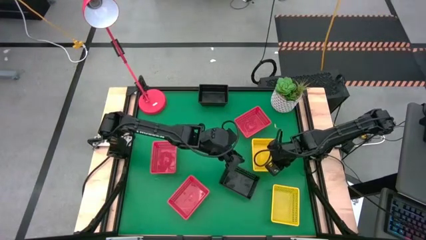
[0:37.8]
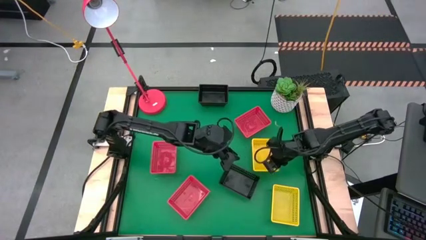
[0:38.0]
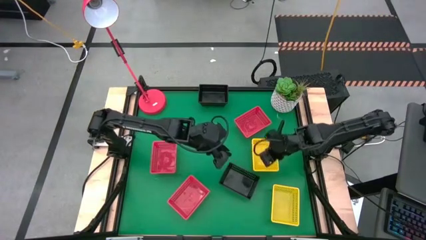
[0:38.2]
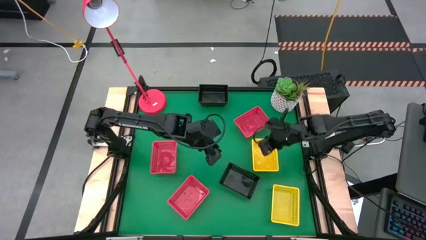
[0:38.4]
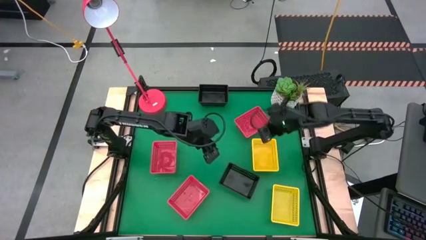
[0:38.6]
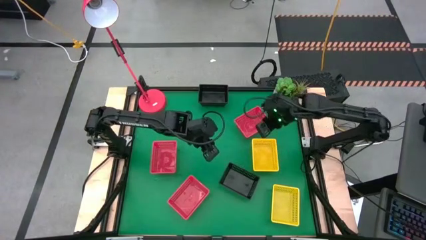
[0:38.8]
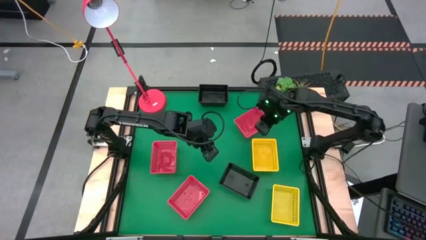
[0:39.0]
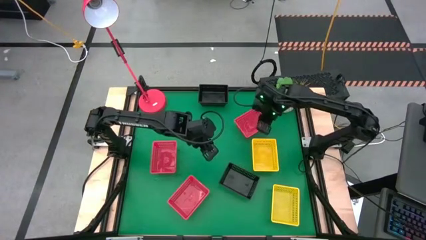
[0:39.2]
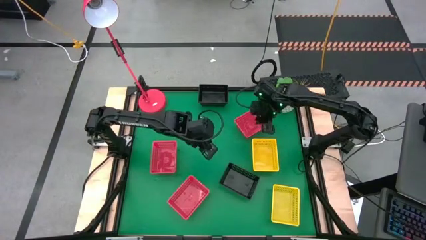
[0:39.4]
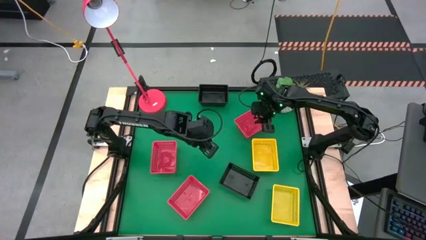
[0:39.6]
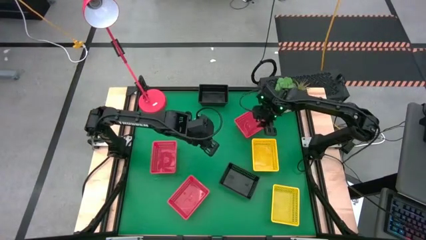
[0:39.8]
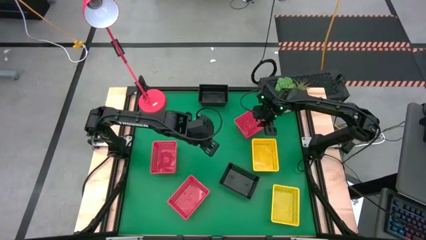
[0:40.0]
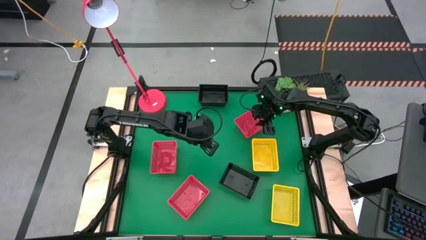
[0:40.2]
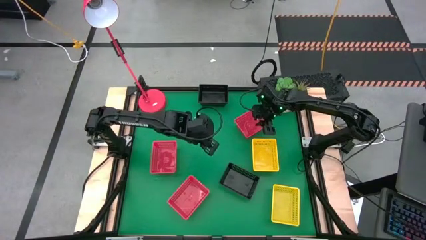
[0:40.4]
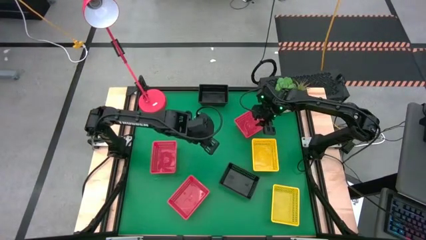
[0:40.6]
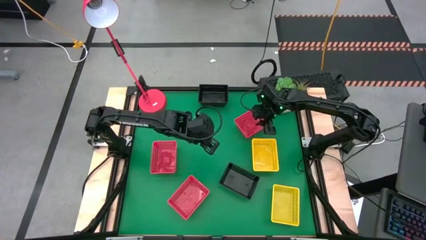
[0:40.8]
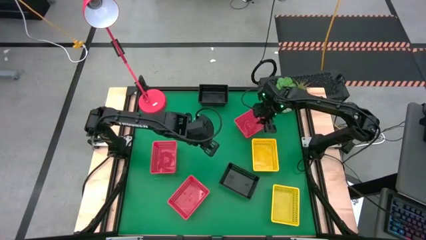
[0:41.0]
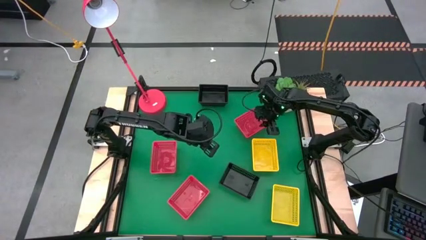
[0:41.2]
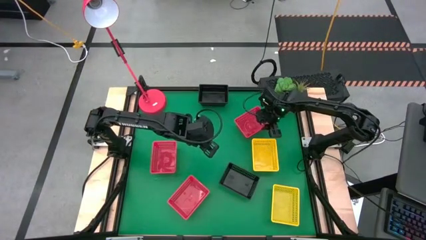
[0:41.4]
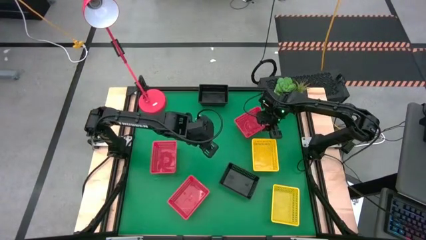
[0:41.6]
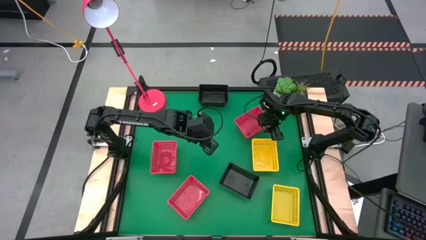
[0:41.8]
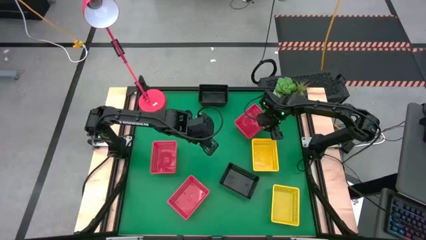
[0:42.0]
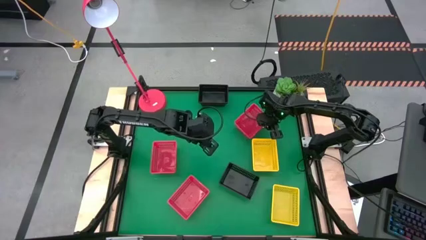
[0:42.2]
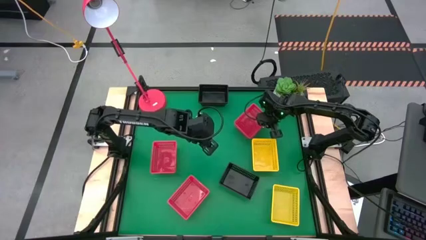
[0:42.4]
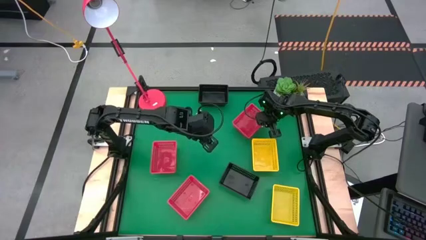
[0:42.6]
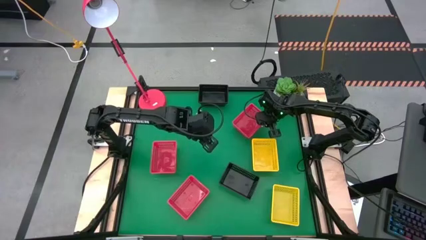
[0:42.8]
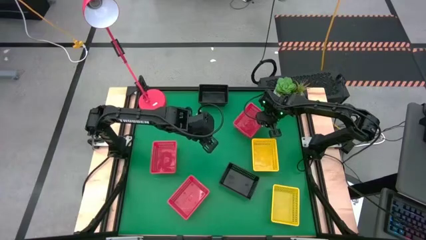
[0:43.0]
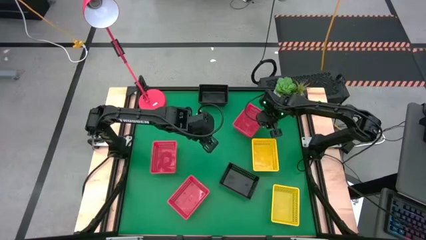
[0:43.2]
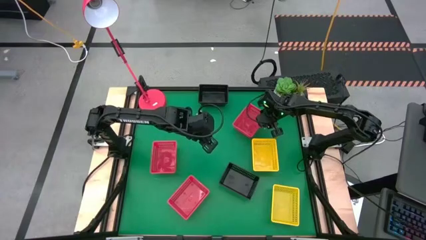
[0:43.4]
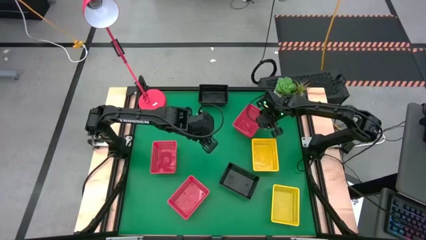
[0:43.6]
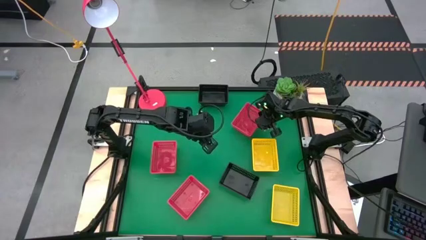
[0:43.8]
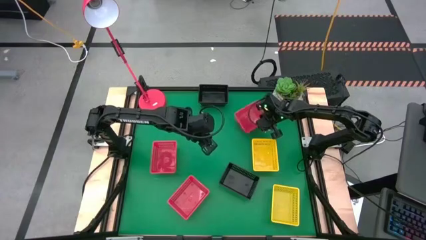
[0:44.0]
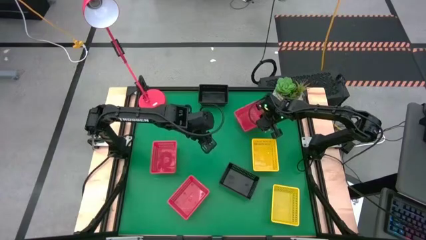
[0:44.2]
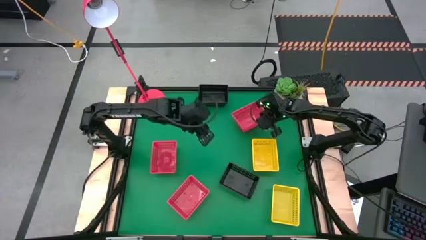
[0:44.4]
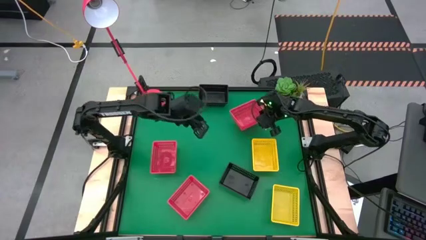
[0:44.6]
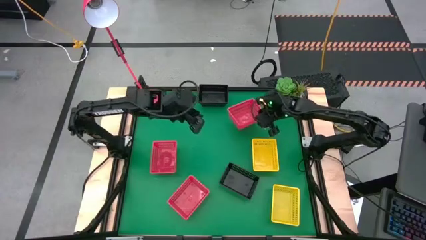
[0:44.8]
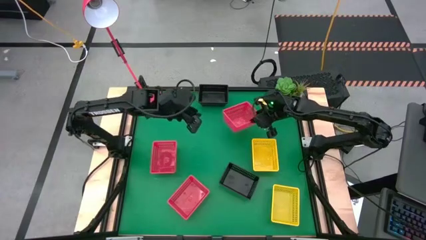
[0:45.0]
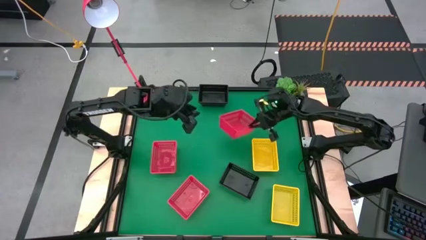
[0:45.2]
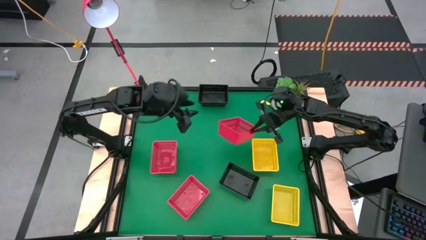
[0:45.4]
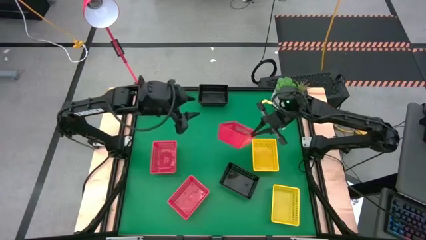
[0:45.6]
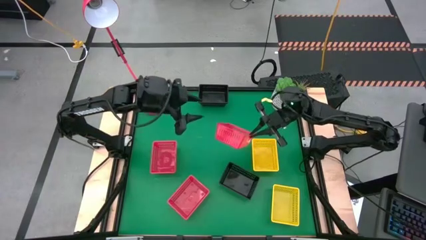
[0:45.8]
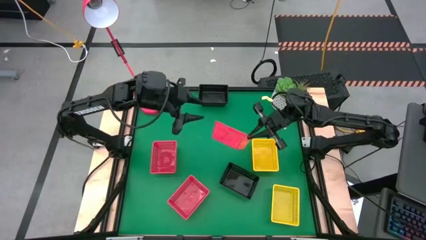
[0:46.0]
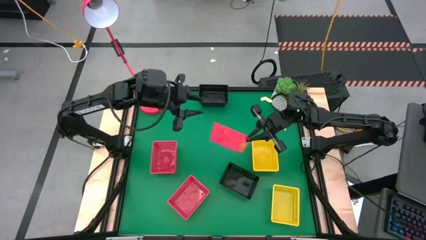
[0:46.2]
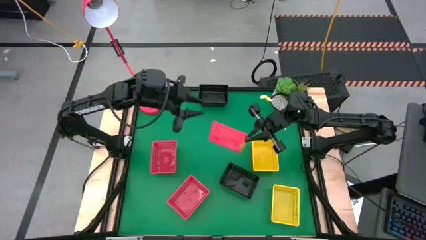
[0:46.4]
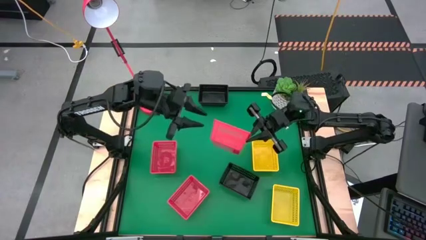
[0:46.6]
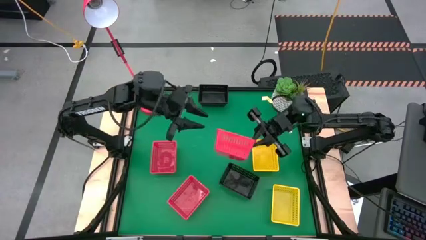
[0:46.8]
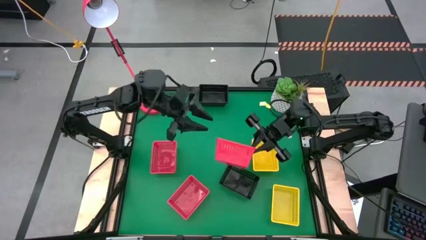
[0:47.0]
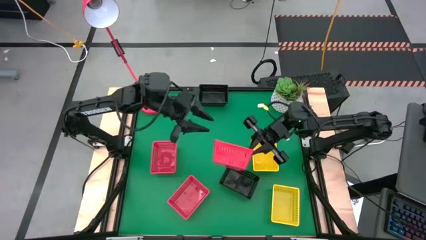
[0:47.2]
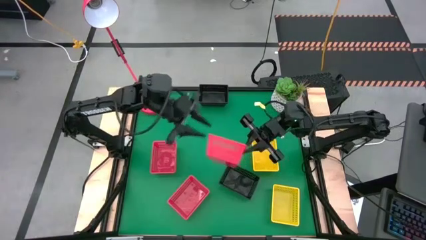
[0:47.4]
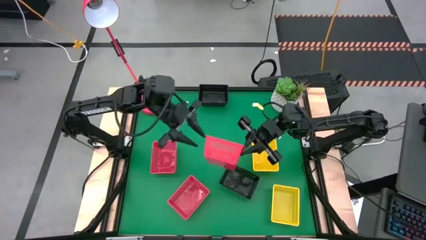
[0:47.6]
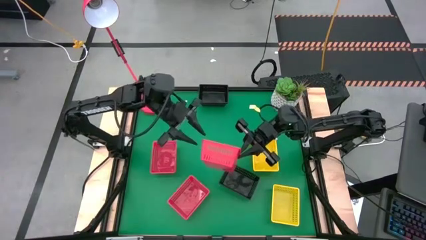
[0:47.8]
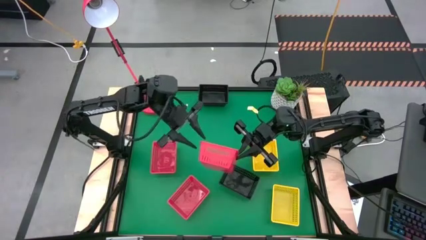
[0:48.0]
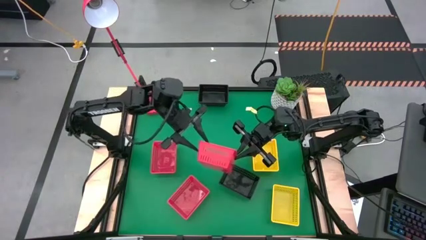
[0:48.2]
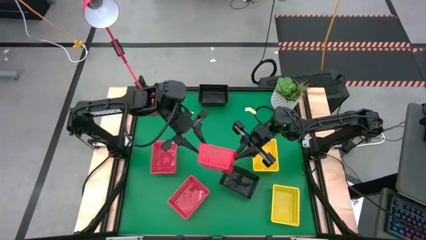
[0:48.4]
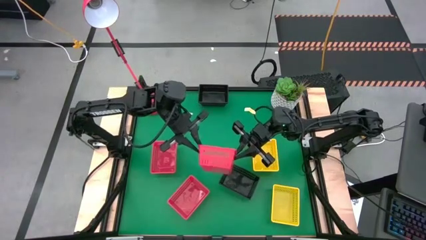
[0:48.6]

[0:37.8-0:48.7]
Stack the top red bin on the middle red bin

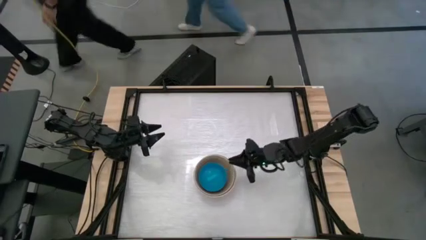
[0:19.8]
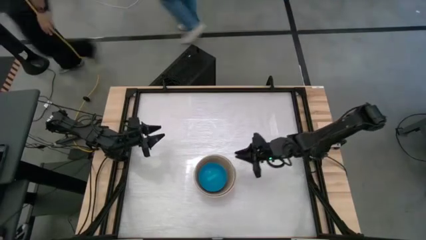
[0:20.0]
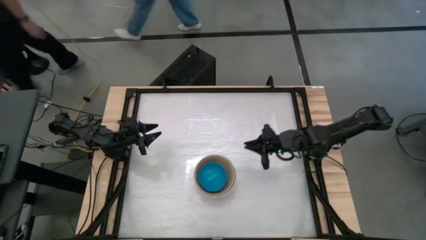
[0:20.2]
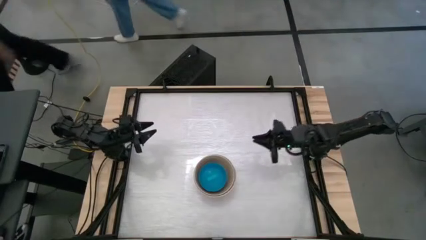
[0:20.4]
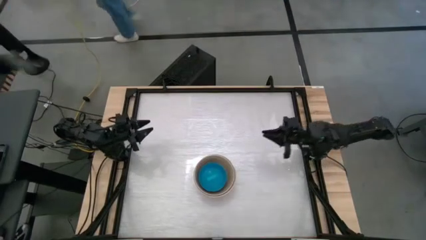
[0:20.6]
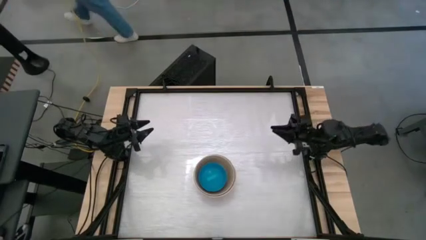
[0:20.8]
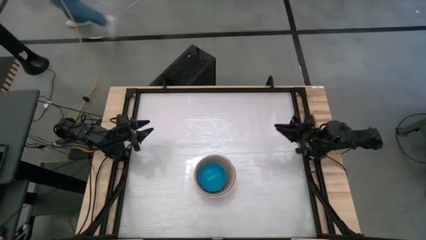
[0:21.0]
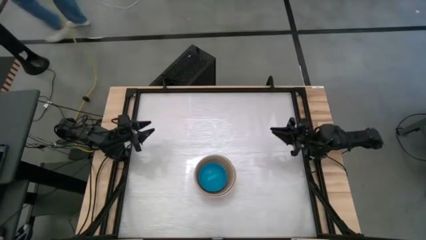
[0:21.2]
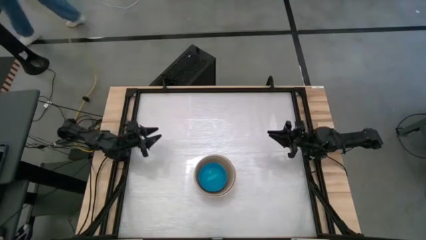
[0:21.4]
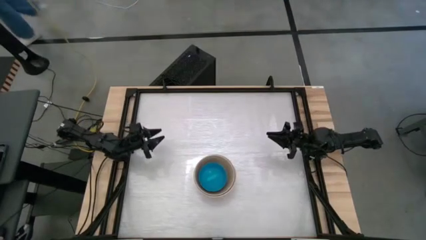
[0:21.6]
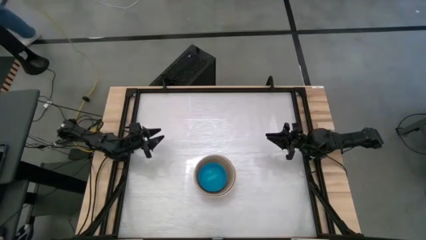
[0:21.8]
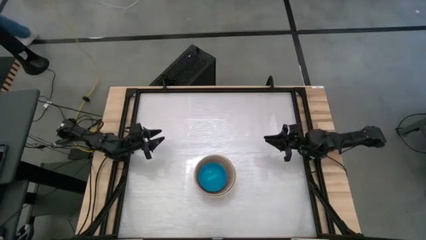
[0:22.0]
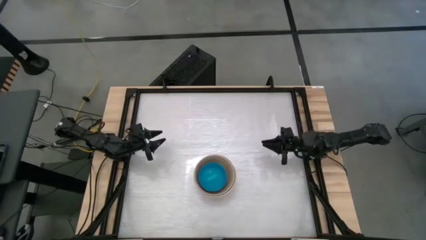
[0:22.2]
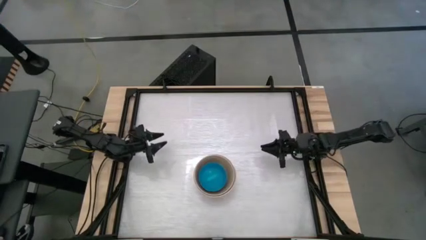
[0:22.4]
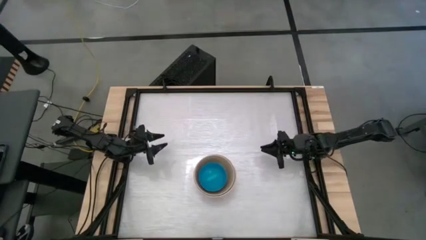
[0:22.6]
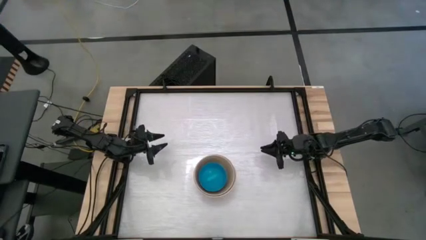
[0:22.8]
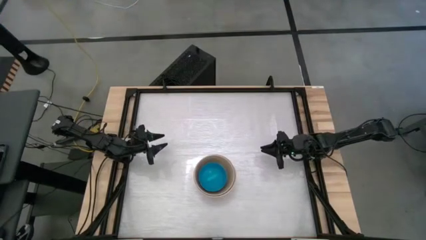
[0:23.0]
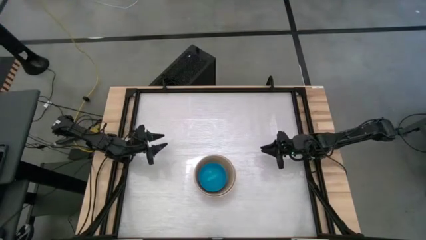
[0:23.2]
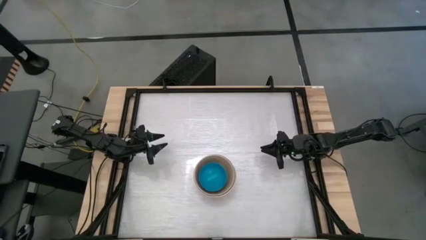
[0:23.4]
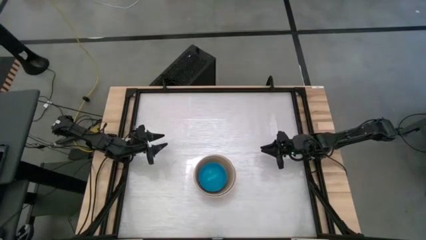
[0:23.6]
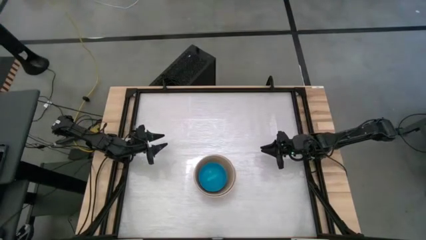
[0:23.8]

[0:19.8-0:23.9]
Return to Home Position
